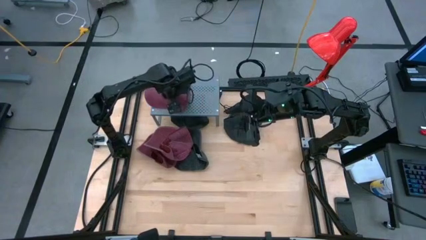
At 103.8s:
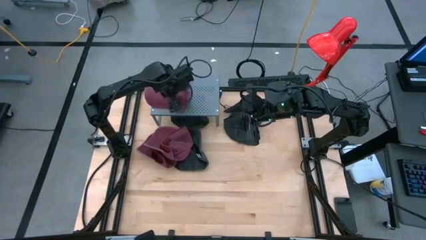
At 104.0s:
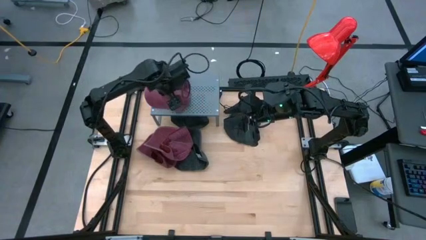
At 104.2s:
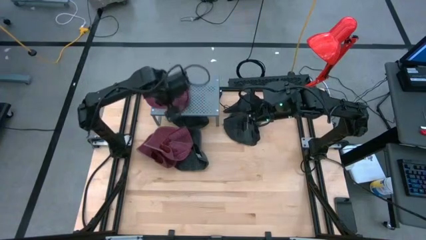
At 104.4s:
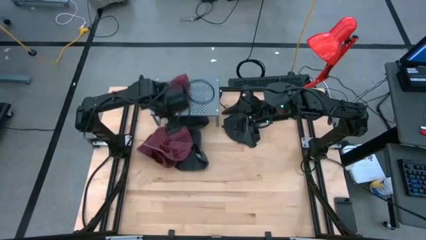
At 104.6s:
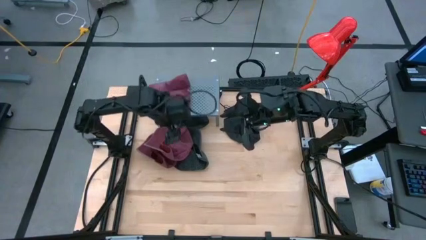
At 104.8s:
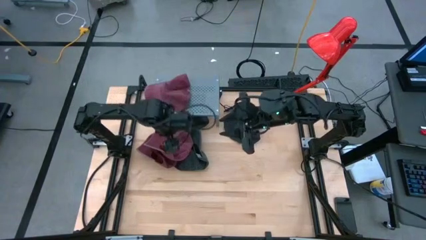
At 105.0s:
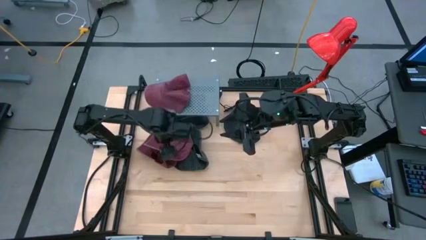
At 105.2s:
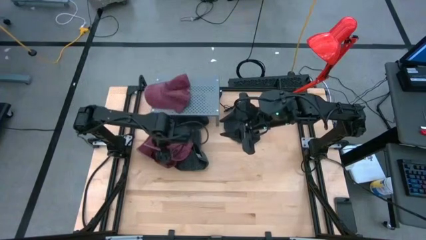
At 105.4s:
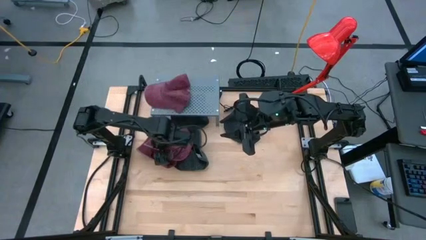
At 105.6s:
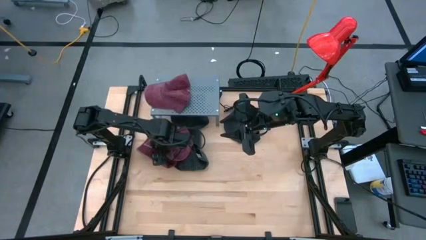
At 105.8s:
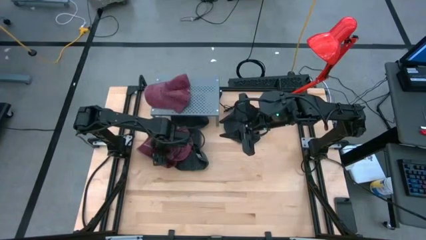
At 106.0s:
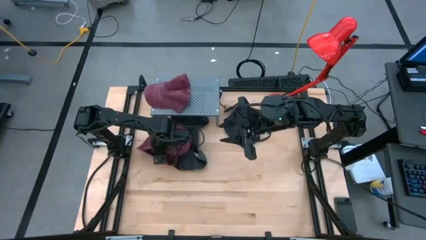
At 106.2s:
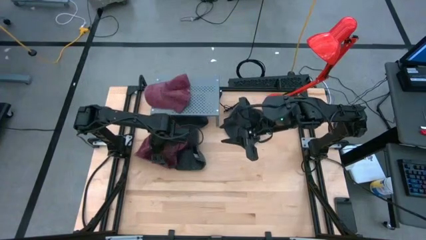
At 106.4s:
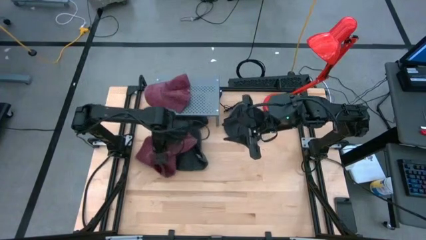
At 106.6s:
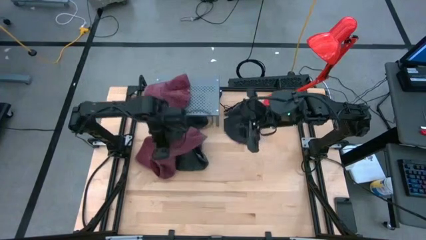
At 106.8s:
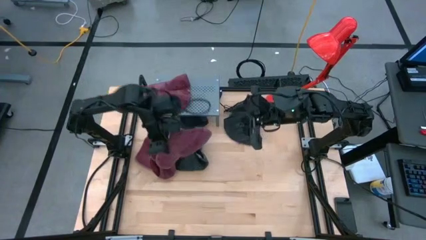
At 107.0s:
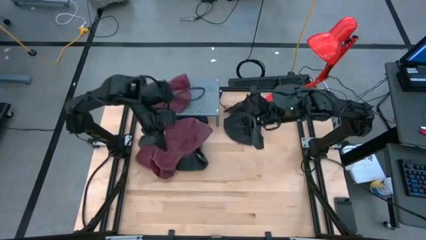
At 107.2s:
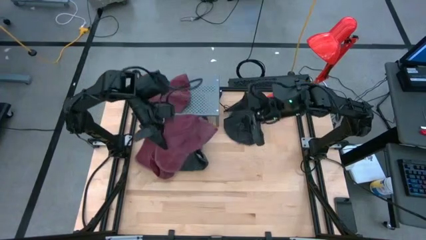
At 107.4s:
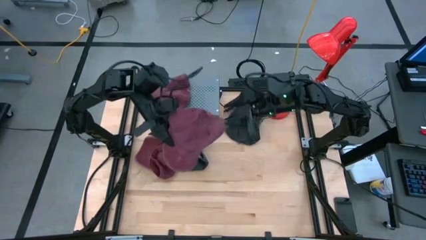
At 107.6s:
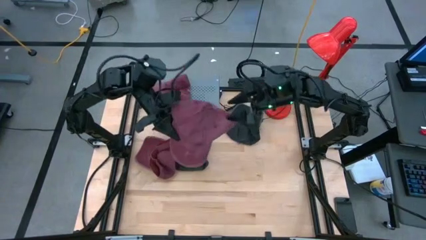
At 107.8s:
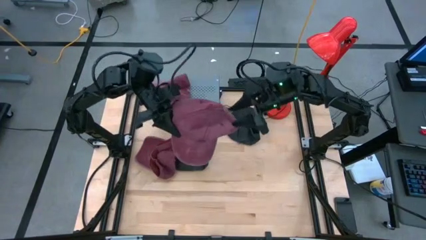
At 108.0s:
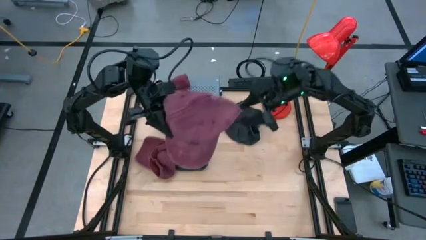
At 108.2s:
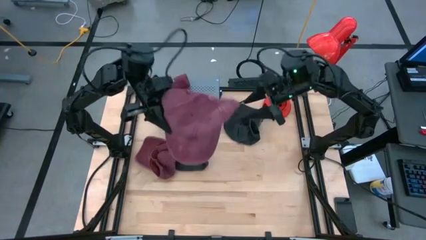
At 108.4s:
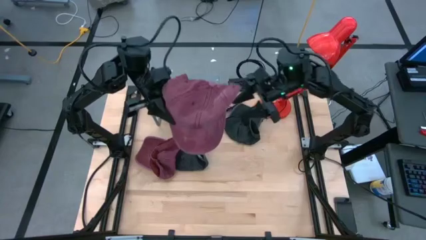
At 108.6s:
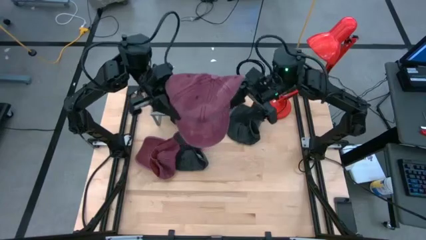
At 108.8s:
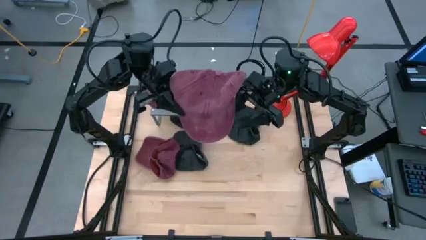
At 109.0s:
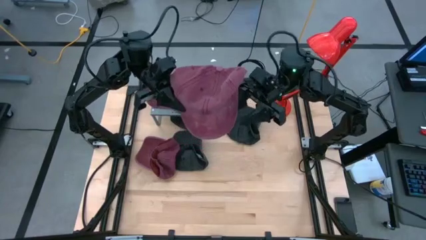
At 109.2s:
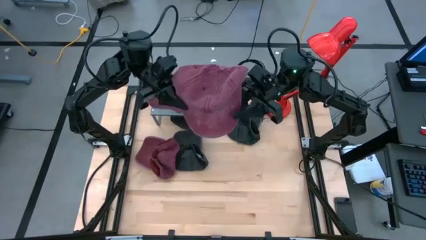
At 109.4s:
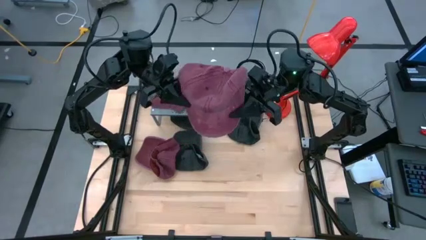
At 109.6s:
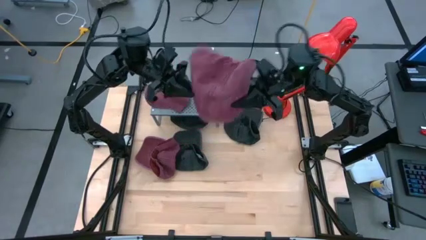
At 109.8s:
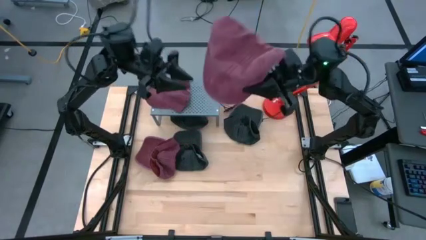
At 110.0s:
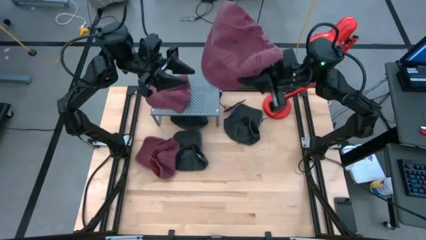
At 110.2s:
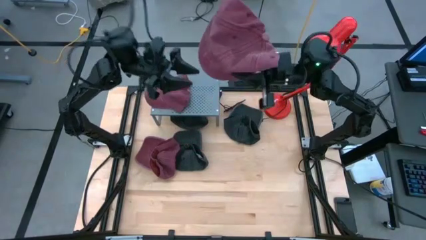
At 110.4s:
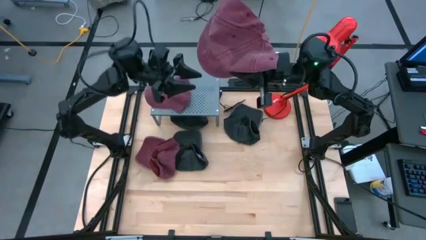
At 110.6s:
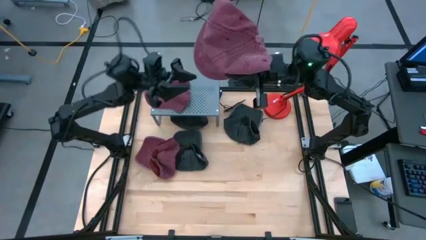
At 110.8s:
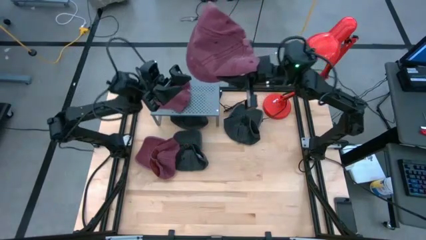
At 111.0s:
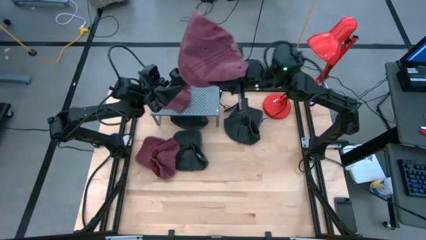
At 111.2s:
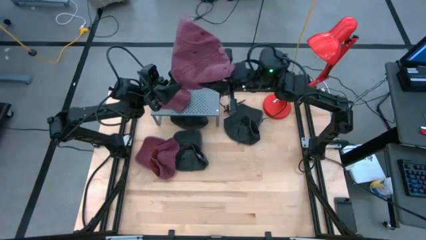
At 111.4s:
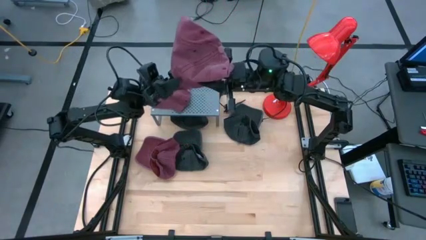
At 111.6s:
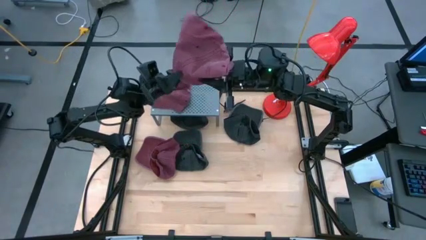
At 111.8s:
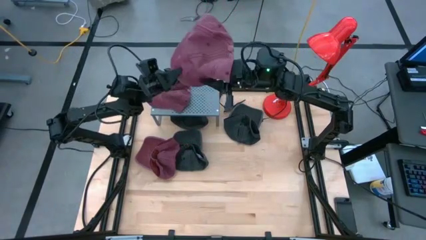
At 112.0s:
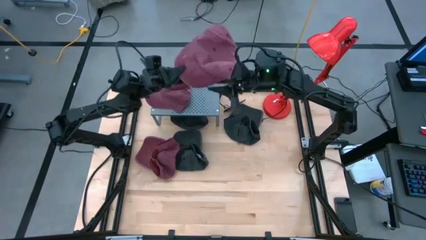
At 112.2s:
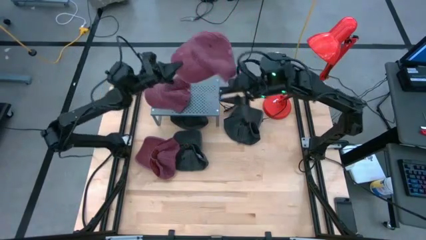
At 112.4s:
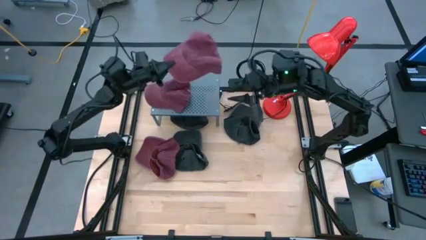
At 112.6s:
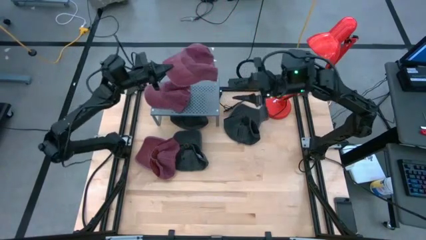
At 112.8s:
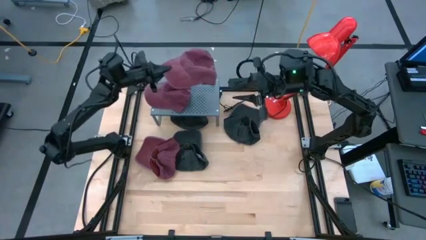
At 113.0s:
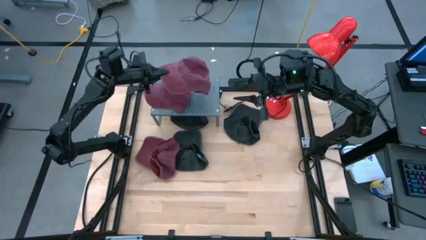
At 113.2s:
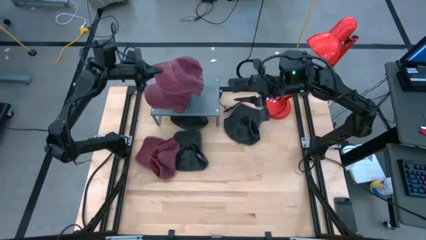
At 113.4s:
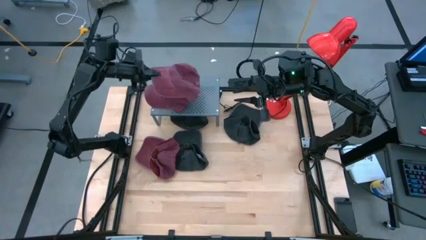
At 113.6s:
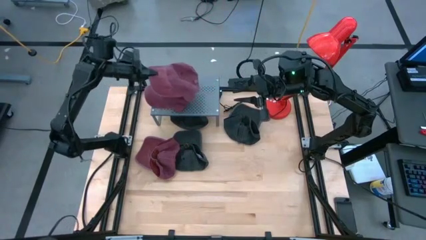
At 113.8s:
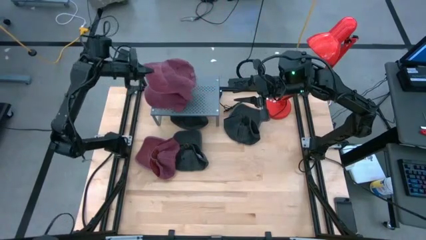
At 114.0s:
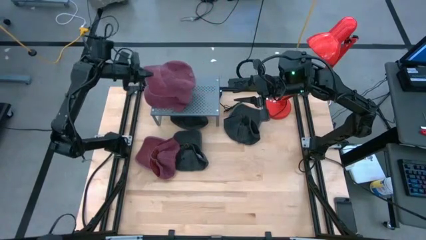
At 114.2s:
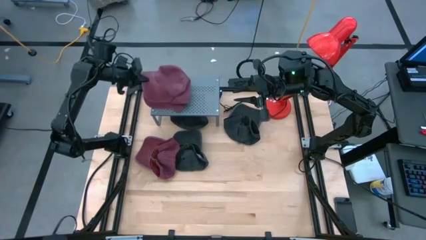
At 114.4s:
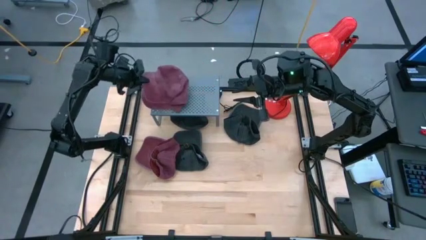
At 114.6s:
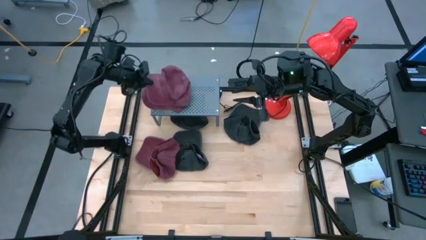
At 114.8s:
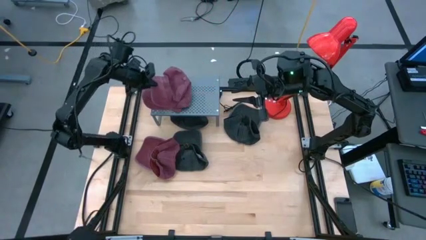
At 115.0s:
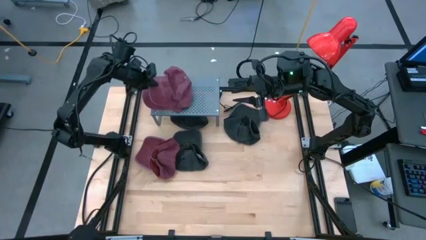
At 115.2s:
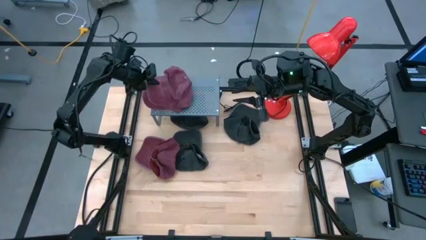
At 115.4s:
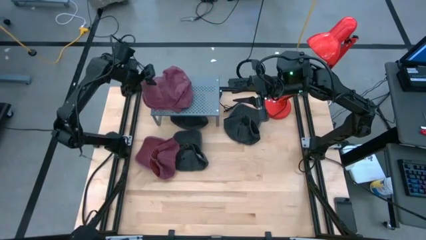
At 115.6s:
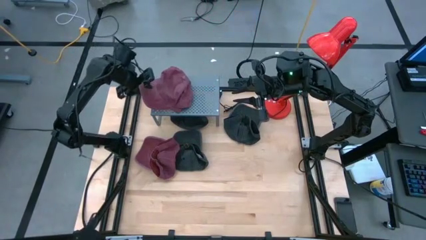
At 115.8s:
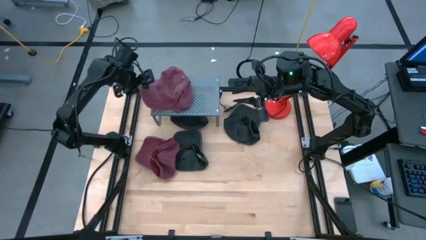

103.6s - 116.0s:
Task: Pick & Place hat
Stack the right red cap on top of the red cap on the shelf

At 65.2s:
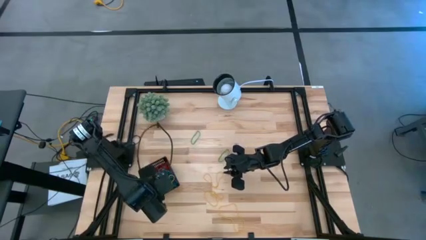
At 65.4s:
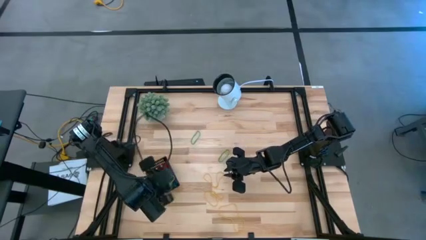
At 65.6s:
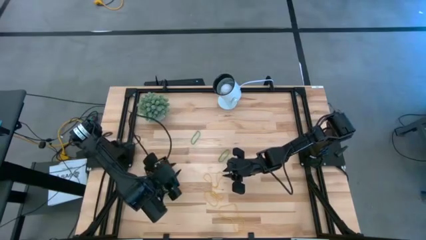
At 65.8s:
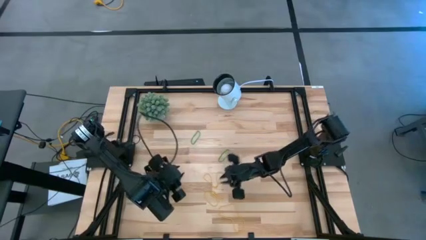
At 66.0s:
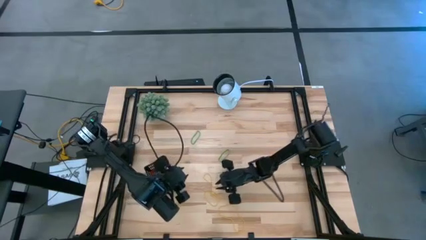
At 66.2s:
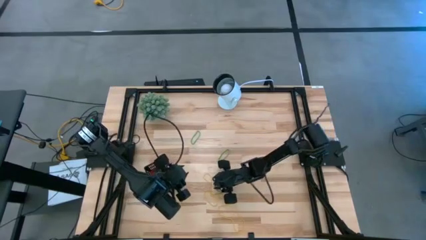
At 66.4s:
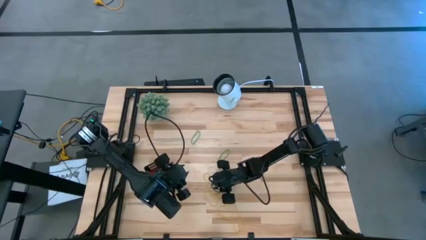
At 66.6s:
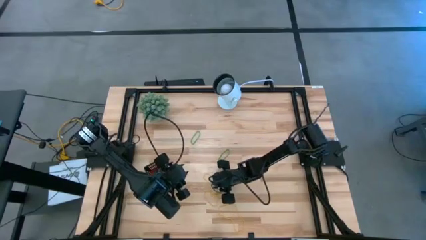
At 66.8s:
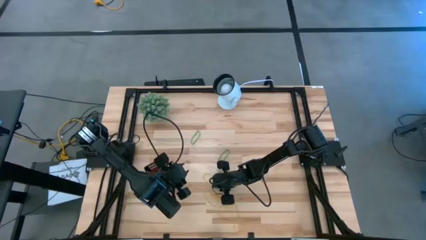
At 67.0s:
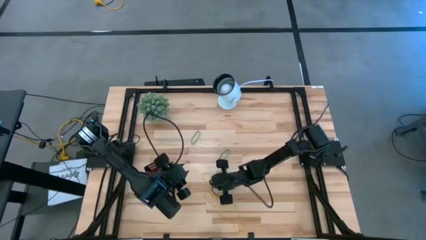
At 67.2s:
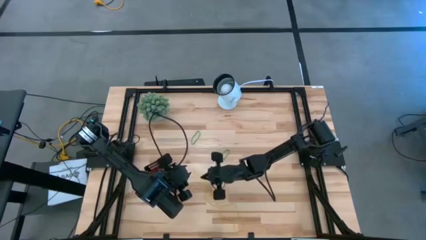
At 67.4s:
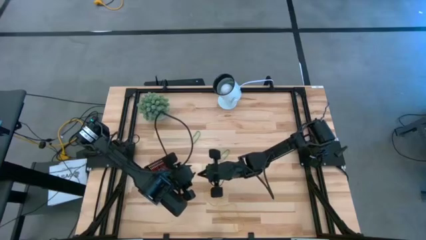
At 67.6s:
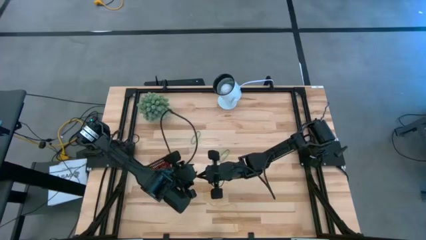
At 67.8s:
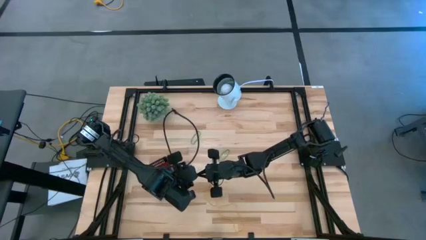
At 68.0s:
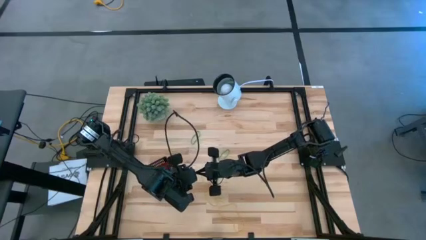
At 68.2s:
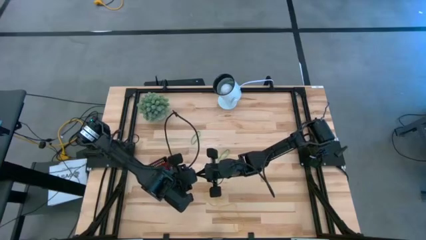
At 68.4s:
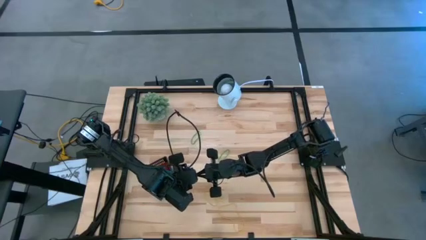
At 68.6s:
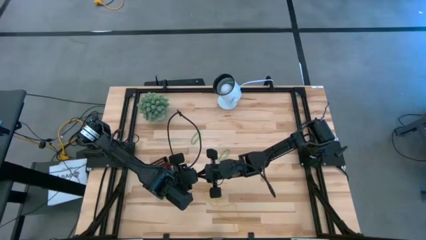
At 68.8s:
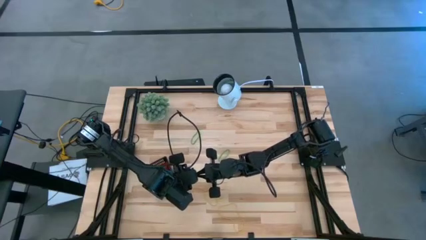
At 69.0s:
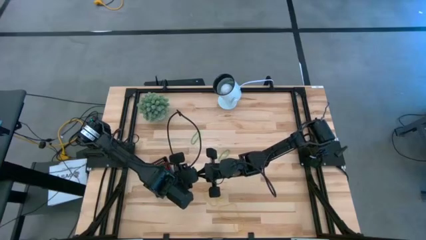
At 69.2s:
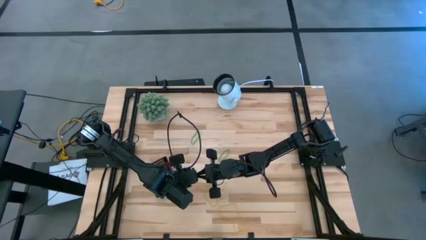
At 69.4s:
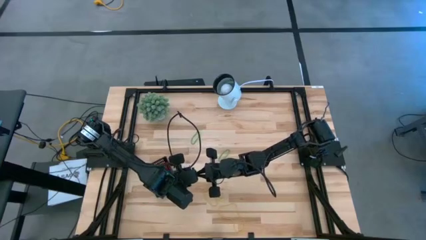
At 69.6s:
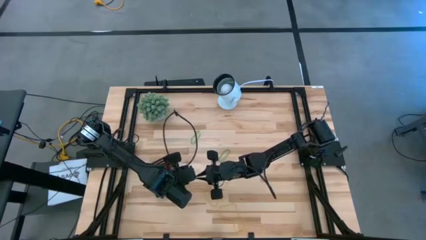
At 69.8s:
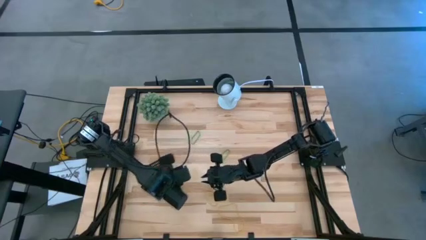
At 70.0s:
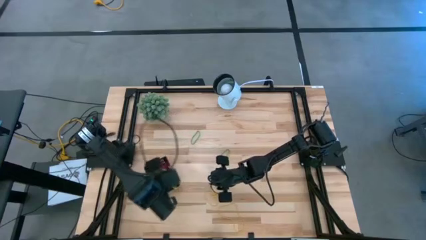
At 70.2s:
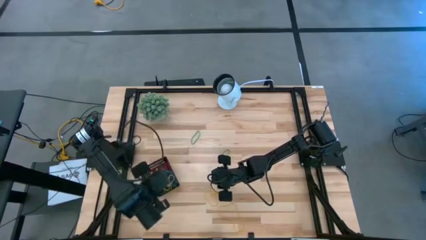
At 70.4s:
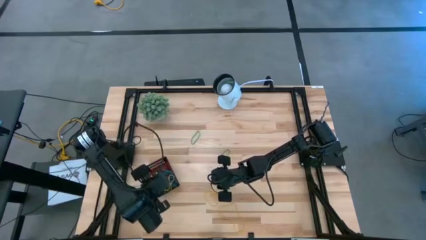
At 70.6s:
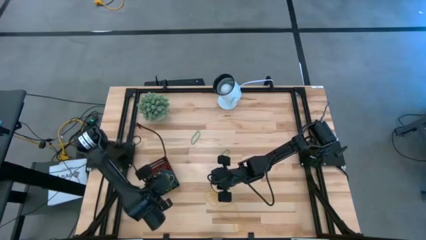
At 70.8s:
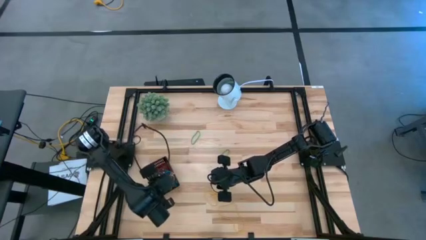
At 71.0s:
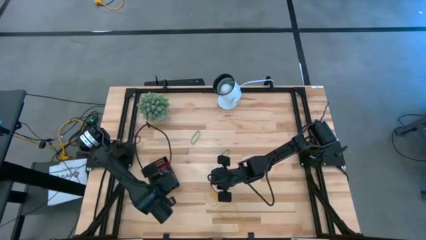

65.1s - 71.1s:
Task: Pick and place items into bin
Put the yellow rubber band into the black bin
